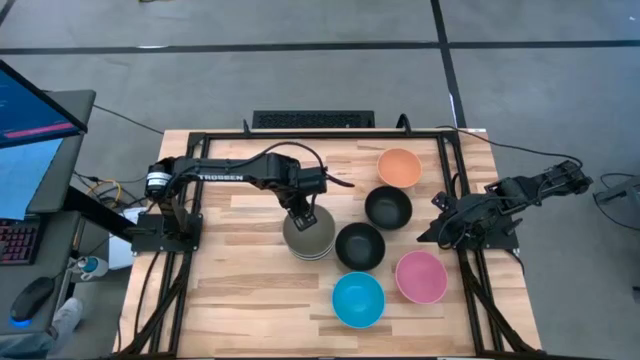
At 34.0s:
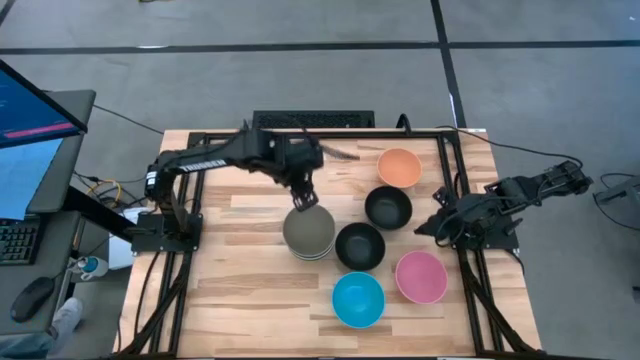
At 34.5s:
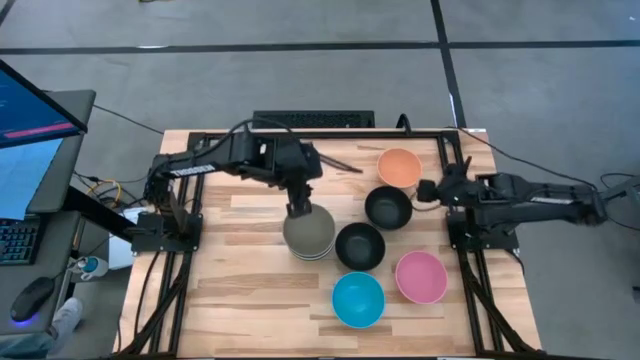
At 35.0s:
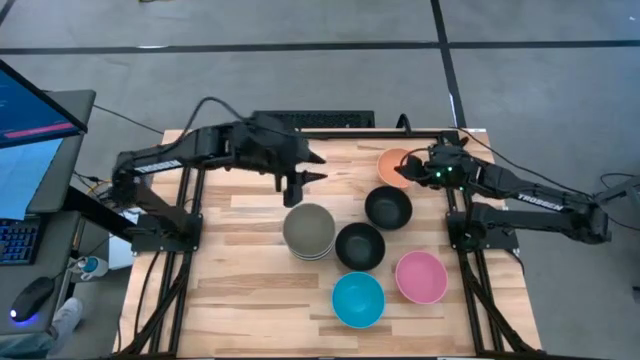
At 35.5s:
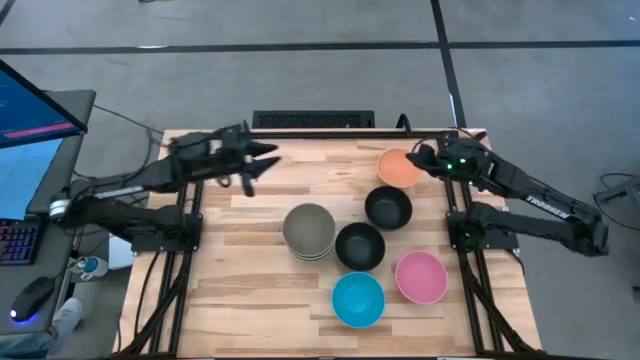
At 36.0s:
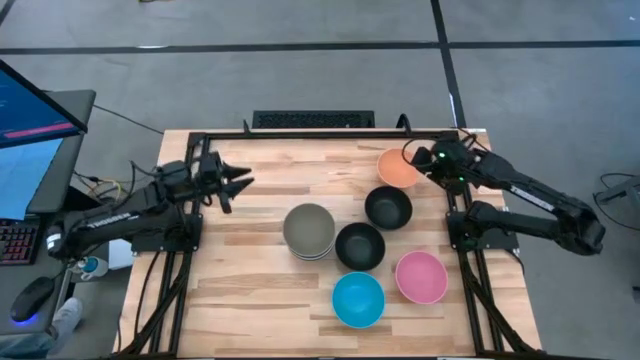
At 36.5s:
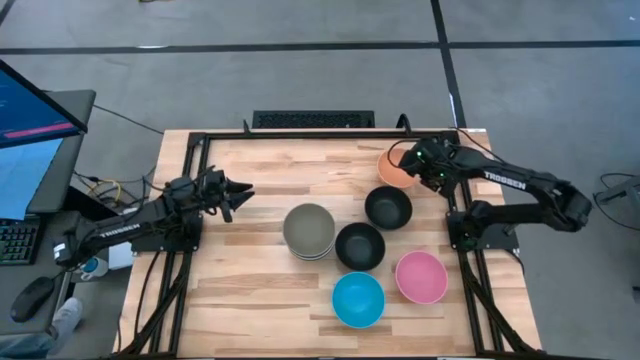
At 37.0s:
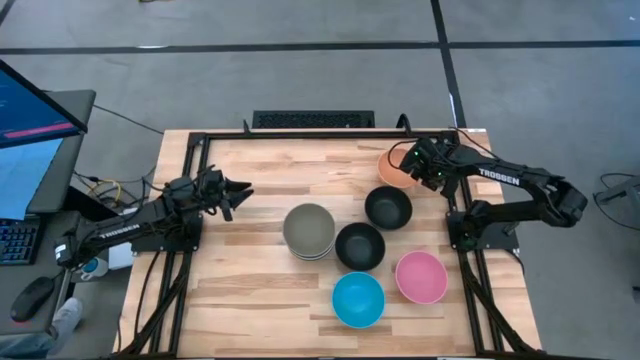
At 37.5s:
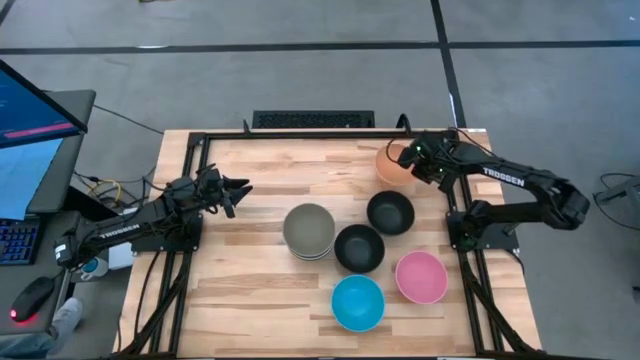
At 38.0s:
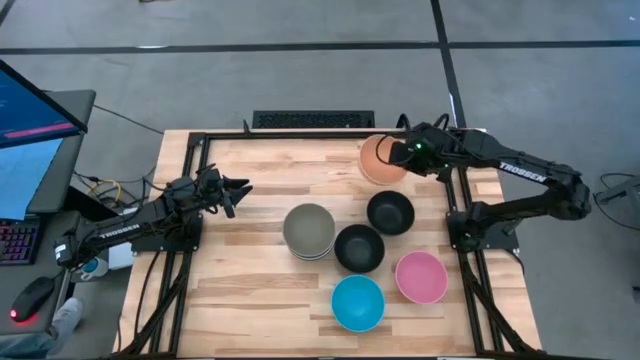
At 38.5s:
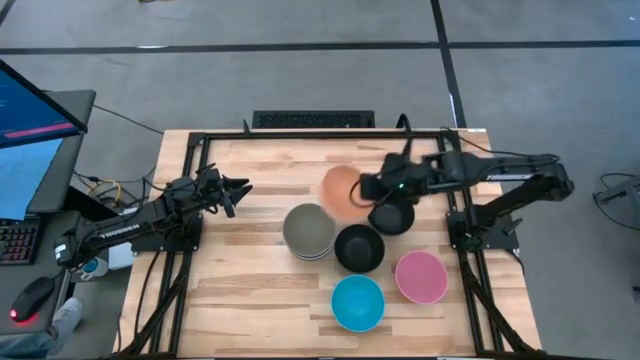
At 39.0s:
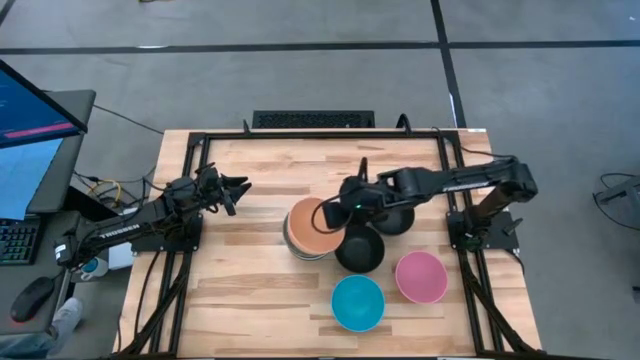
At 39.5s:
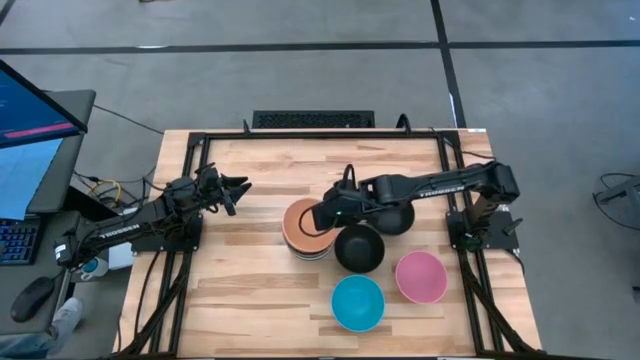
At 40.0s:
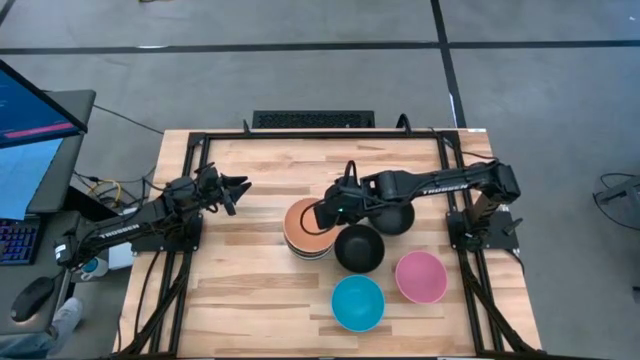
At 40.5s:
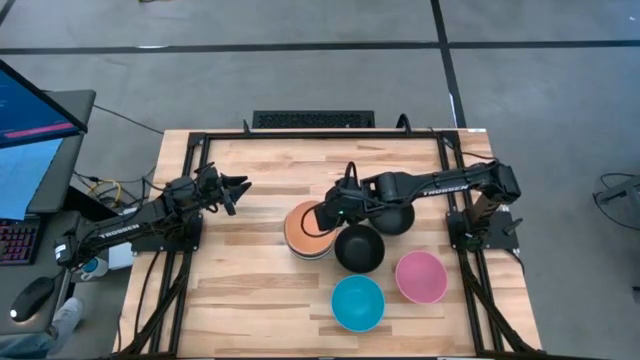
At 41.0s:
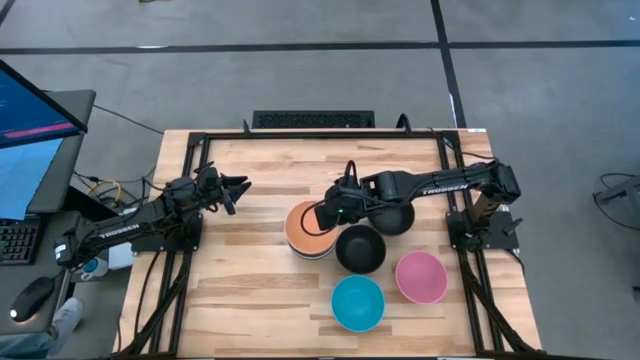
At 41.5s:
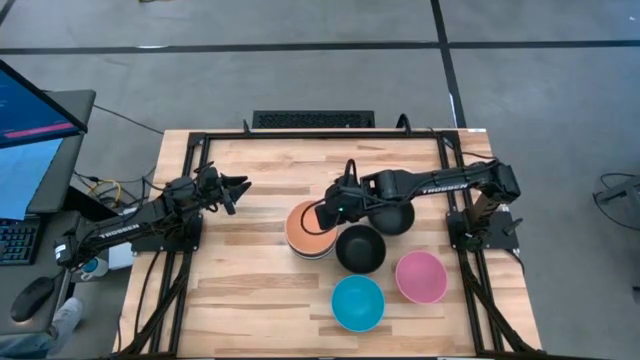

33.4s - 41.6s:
Task: Nest bowls inside each other
Stack the orange bowl on top of the gray bowl

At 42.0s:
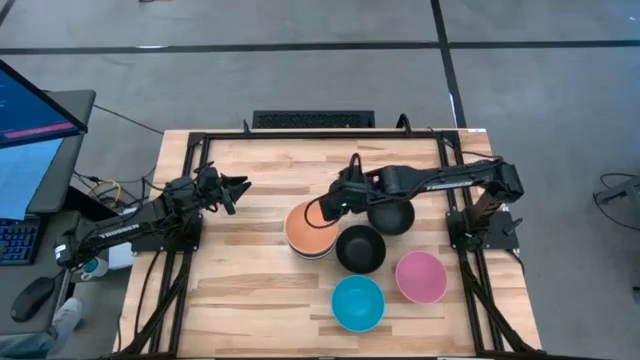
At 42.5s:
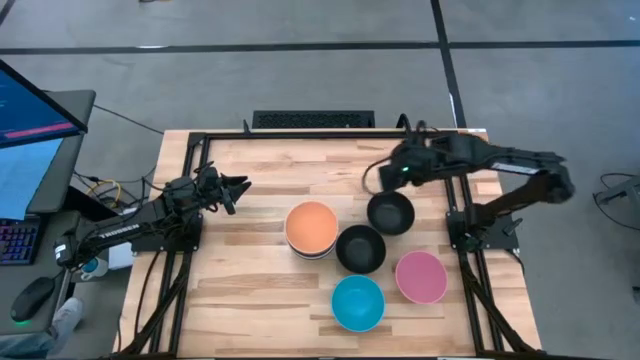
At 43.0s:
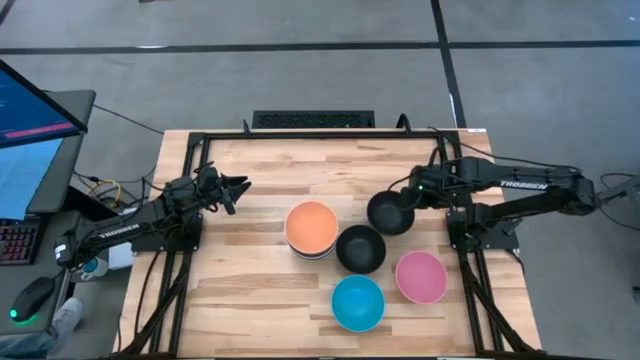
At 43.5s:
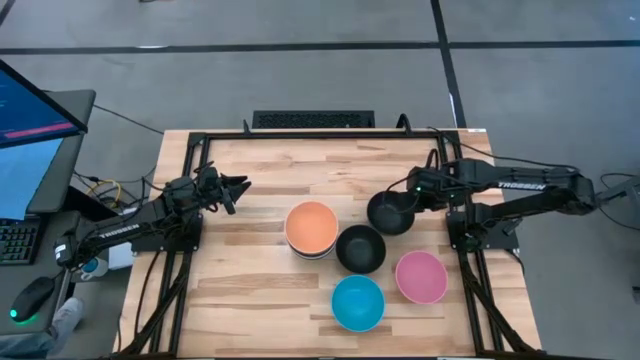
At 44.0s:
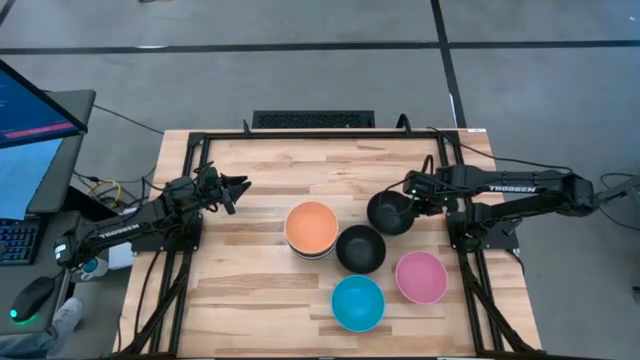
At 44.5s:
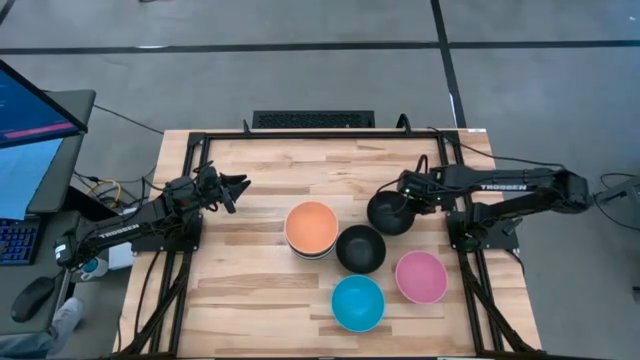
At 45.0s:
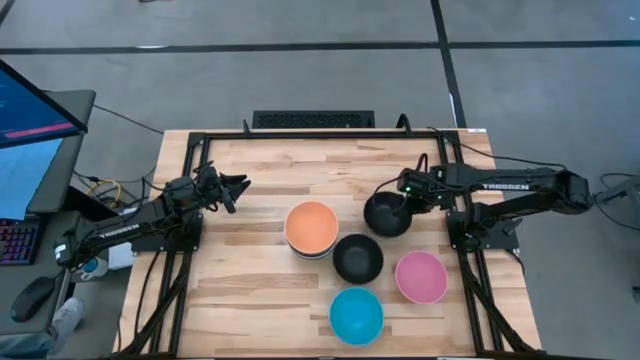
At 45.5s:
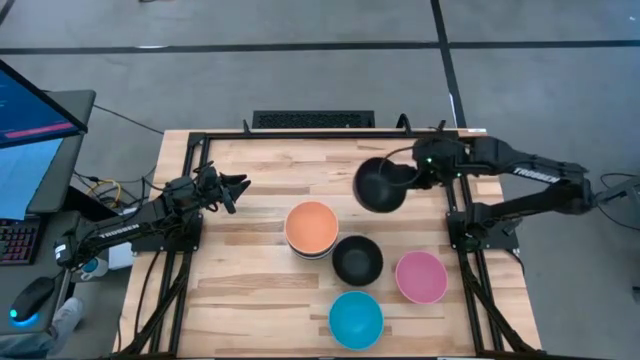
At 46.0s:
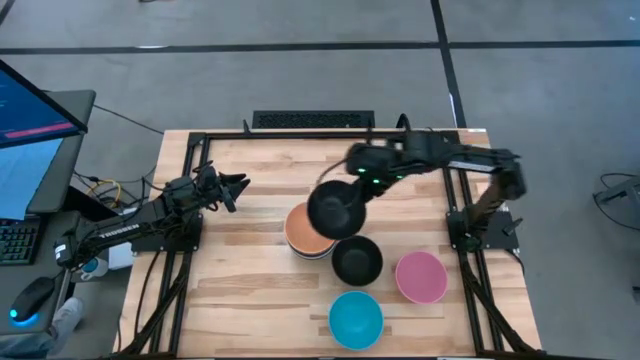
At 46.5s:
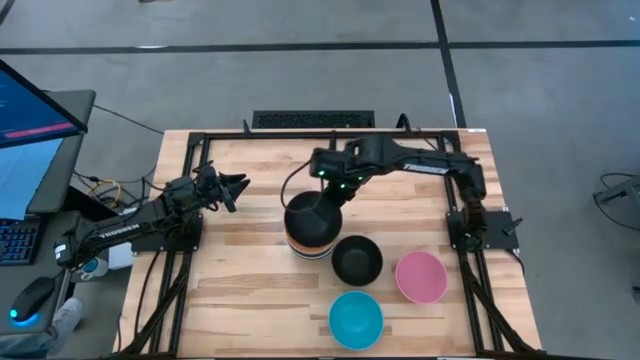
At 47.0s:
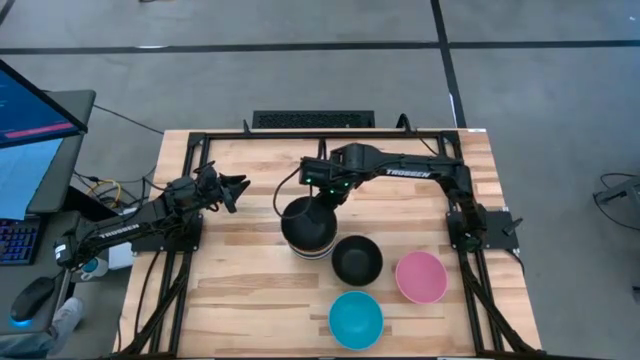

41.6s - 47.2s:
Stack the black bowl on top of the orange bowl

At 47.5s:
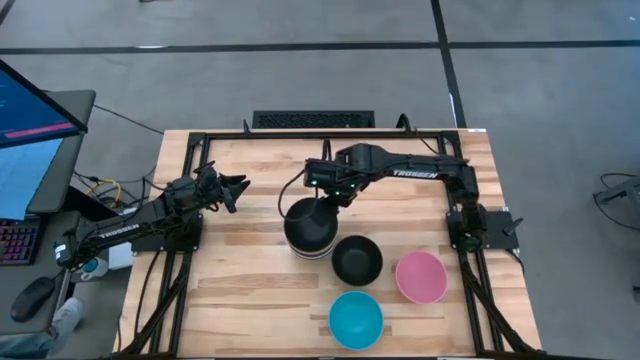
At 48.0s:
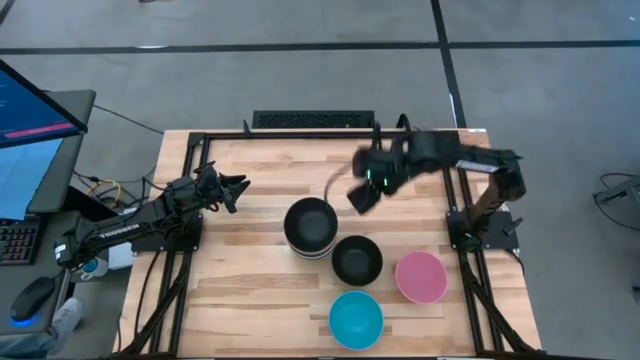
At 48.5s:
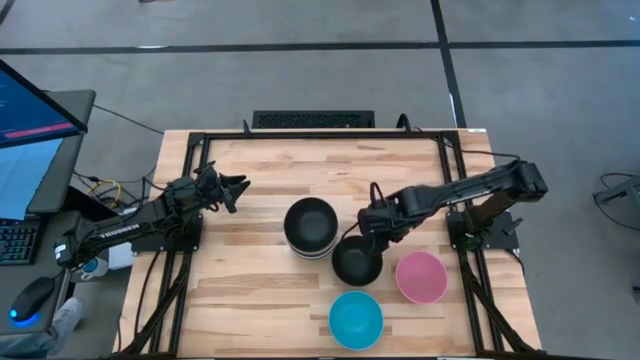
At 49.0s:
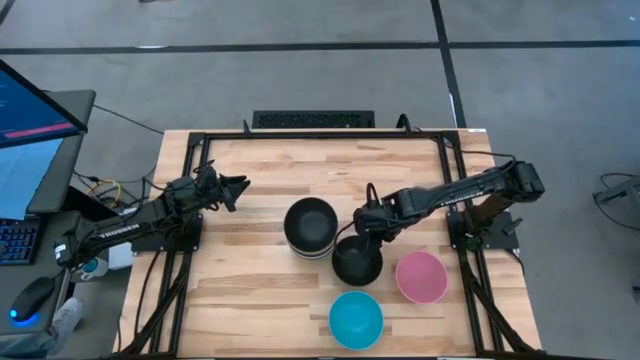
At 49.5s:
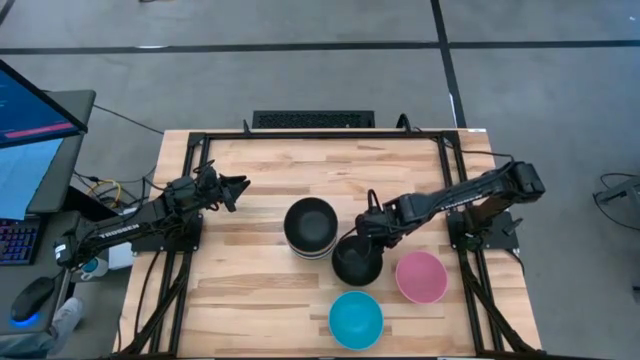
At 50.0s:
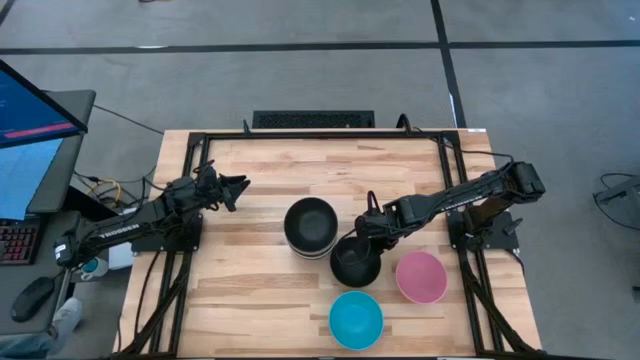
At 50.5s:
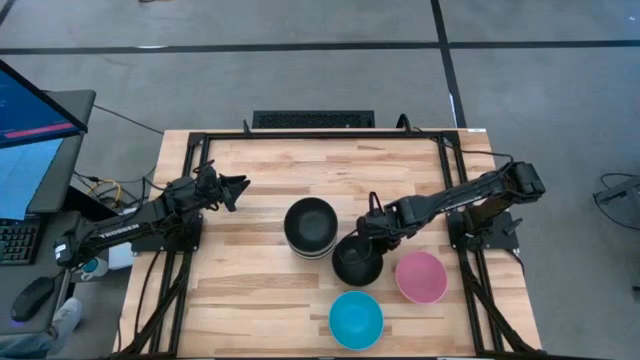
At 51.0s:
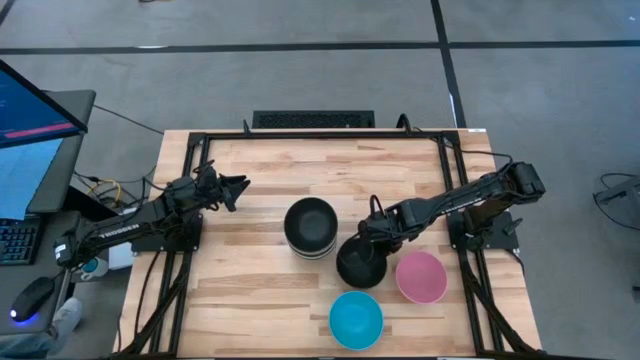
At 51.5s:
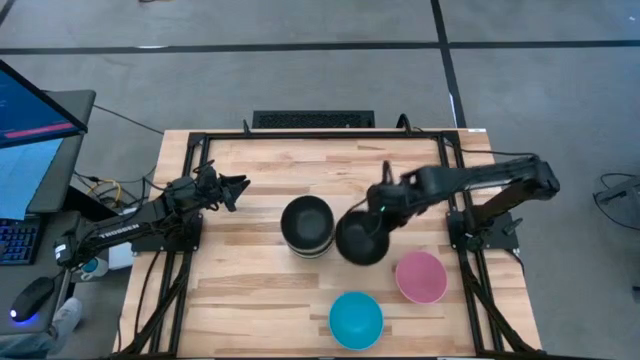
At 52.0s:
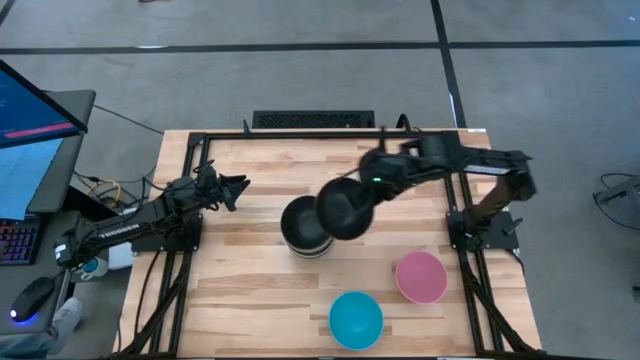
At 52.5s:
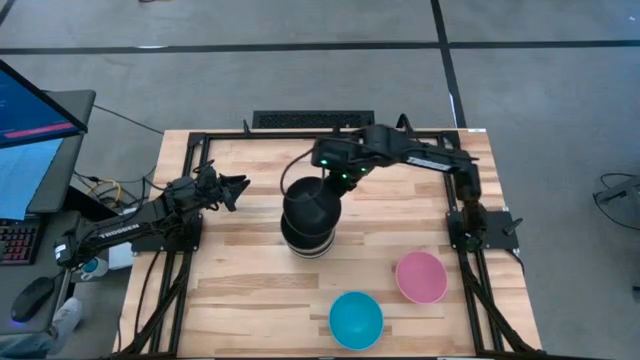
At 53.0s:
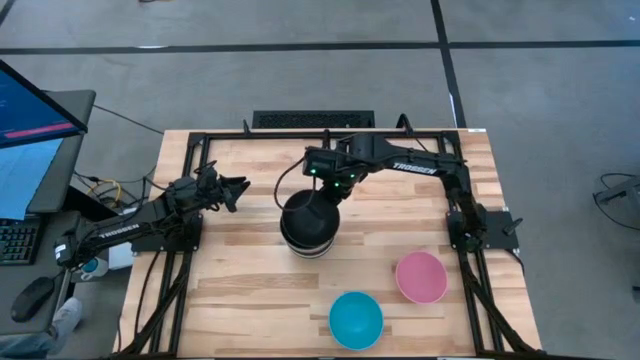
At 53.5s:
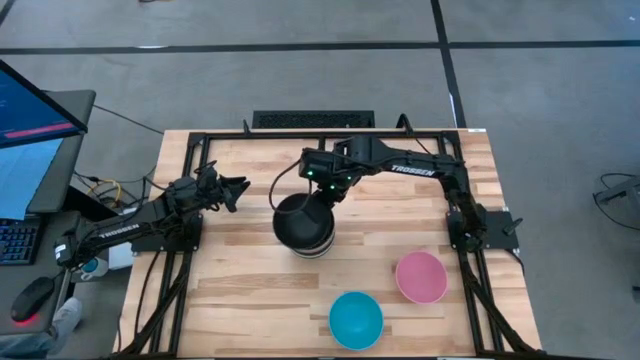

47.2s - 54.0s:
Stack the black bowl on top of the other black bowl
